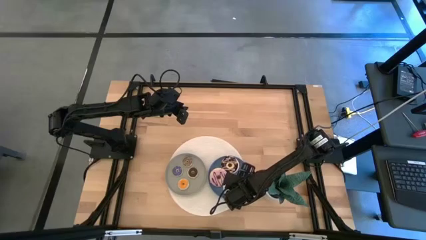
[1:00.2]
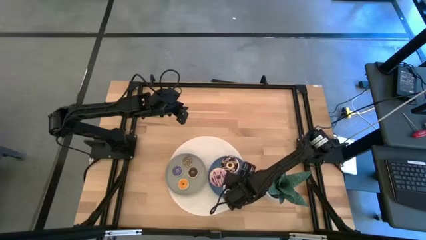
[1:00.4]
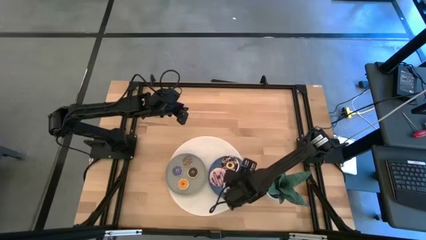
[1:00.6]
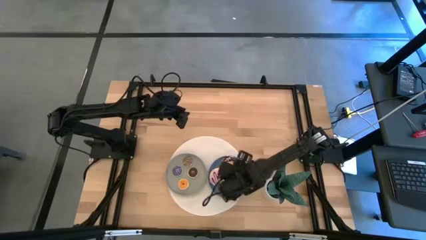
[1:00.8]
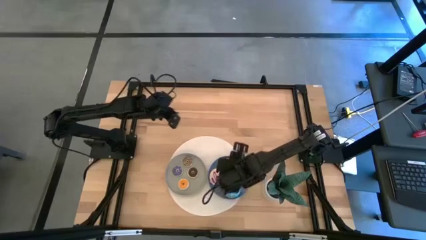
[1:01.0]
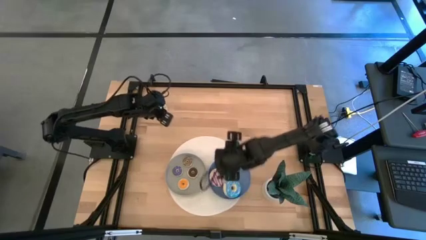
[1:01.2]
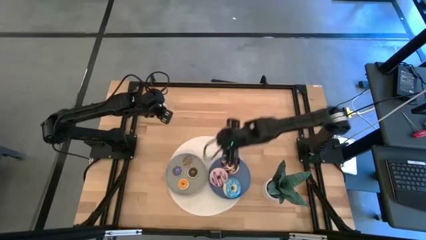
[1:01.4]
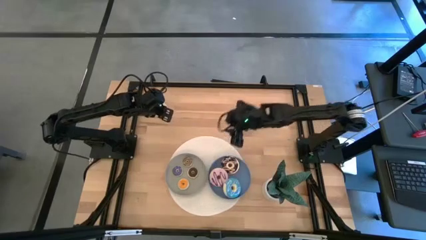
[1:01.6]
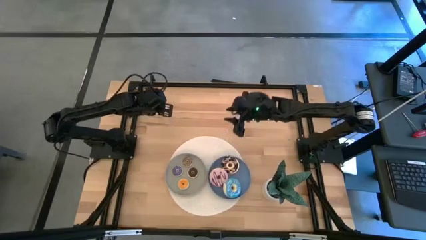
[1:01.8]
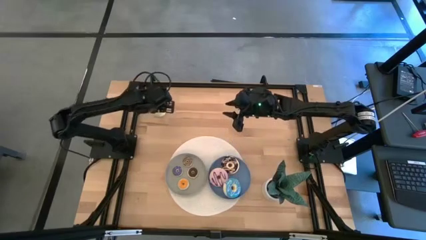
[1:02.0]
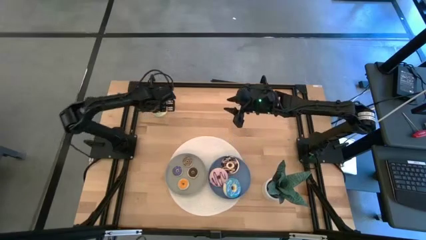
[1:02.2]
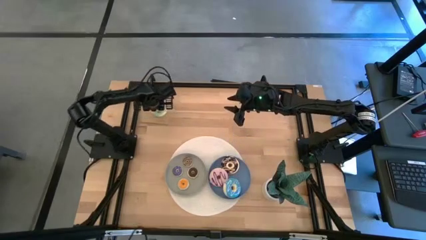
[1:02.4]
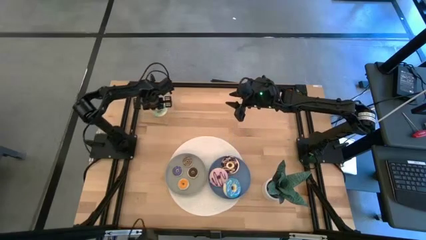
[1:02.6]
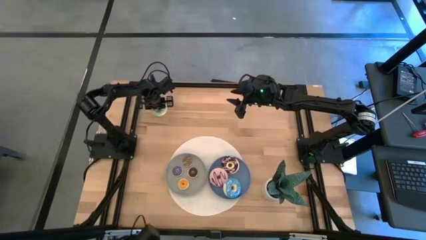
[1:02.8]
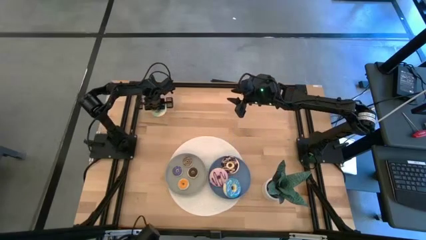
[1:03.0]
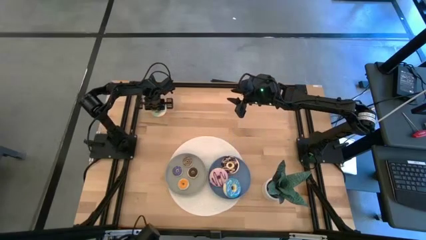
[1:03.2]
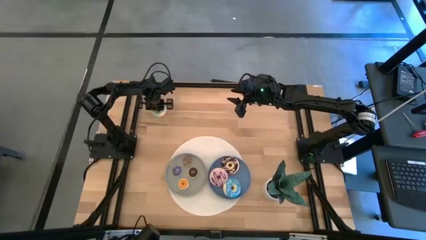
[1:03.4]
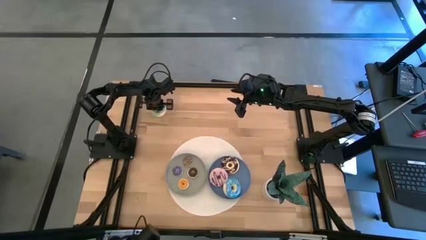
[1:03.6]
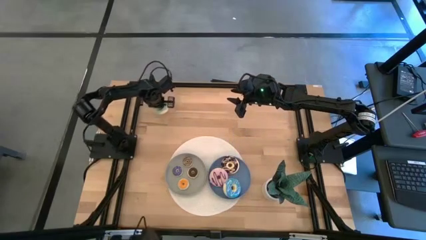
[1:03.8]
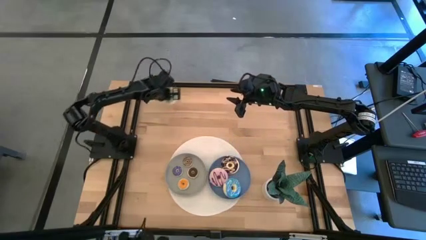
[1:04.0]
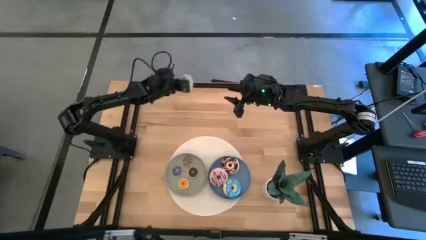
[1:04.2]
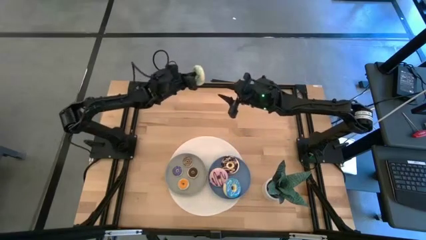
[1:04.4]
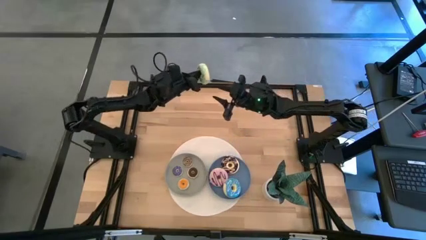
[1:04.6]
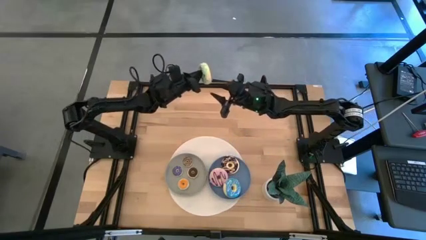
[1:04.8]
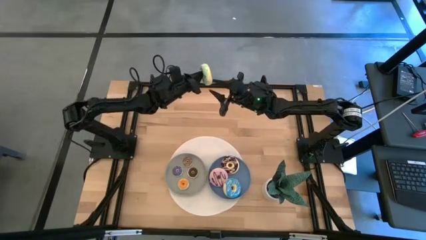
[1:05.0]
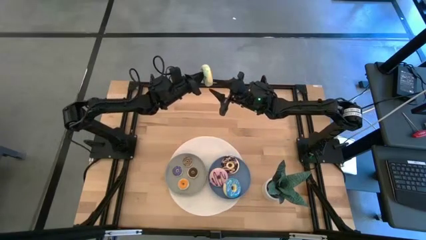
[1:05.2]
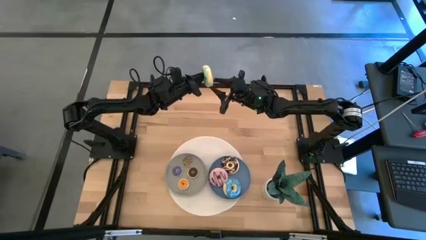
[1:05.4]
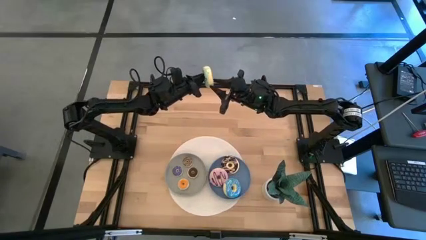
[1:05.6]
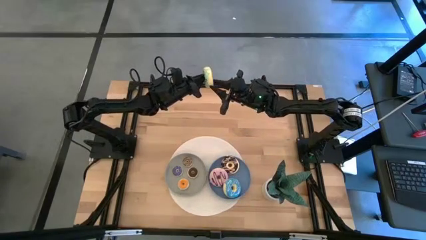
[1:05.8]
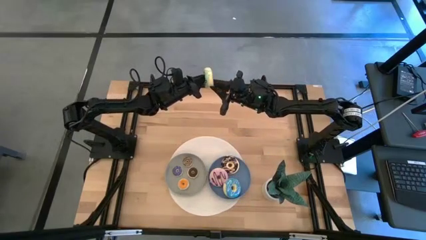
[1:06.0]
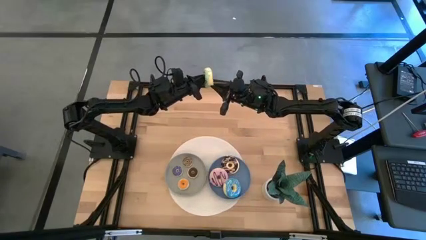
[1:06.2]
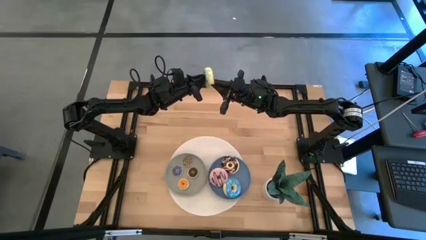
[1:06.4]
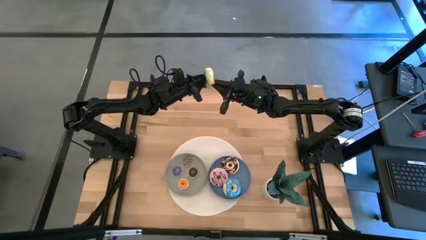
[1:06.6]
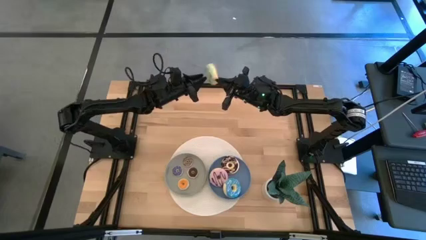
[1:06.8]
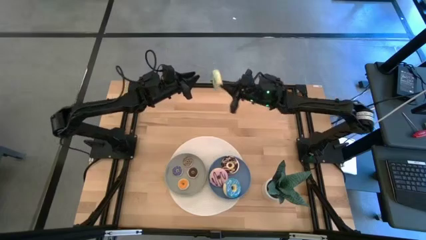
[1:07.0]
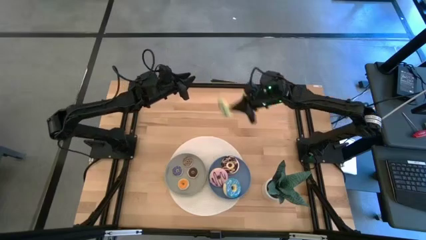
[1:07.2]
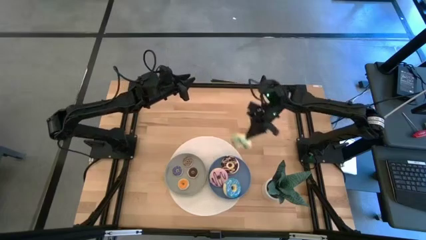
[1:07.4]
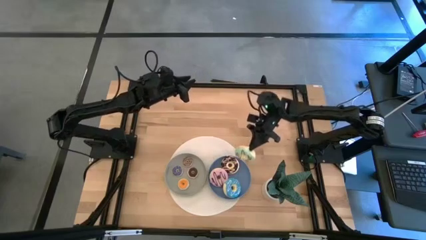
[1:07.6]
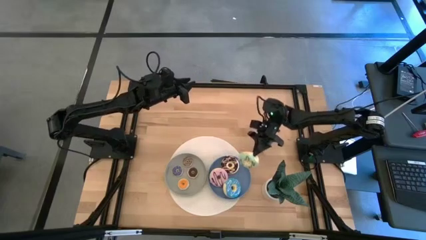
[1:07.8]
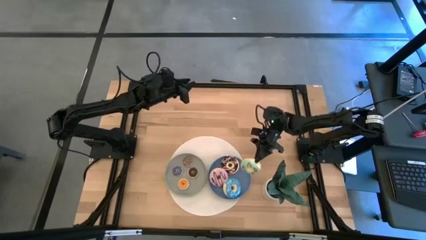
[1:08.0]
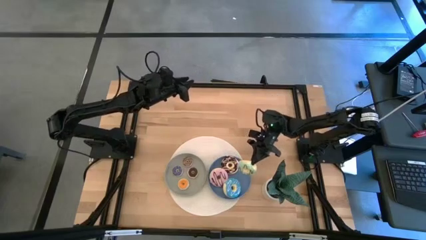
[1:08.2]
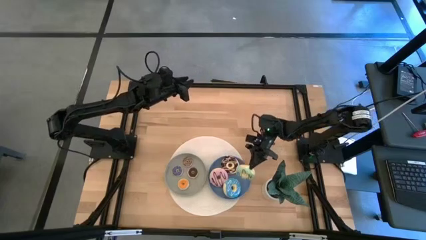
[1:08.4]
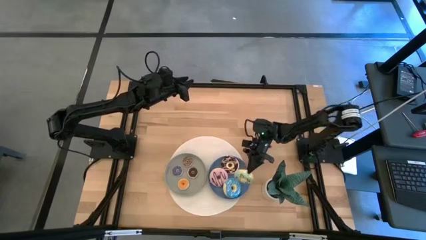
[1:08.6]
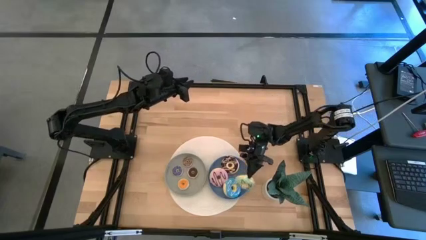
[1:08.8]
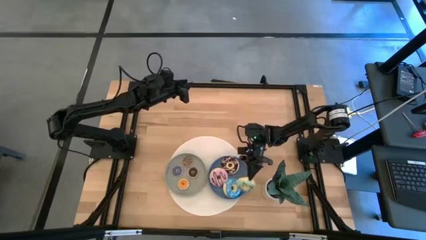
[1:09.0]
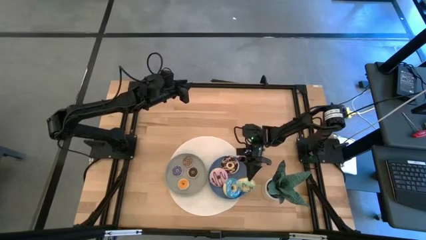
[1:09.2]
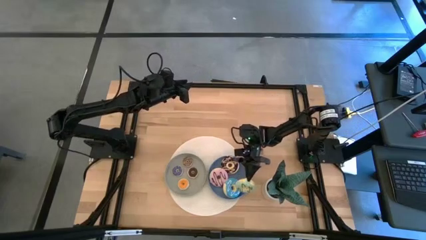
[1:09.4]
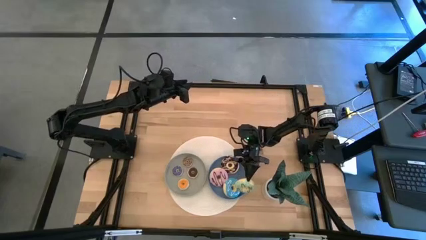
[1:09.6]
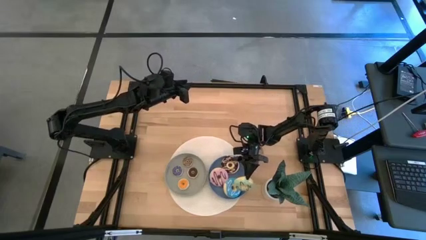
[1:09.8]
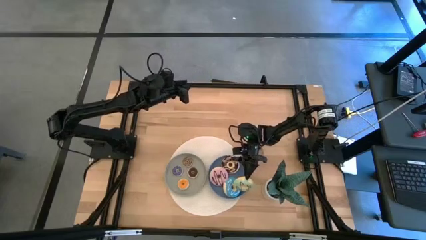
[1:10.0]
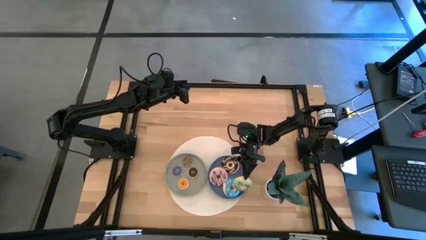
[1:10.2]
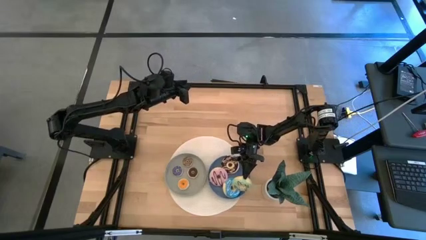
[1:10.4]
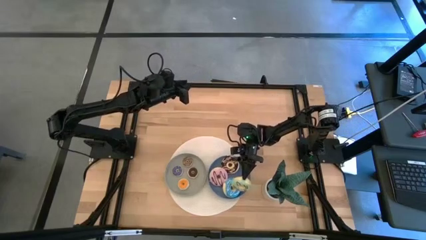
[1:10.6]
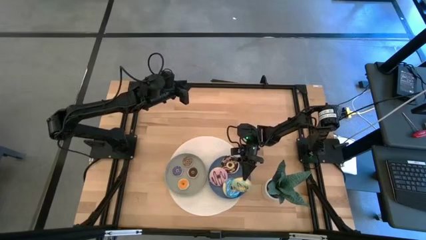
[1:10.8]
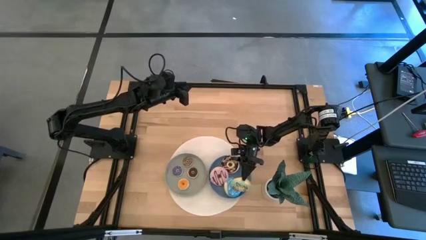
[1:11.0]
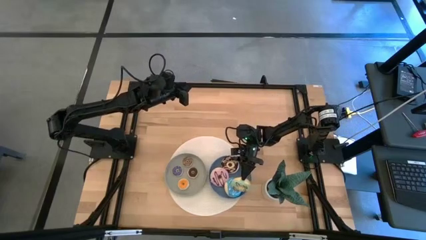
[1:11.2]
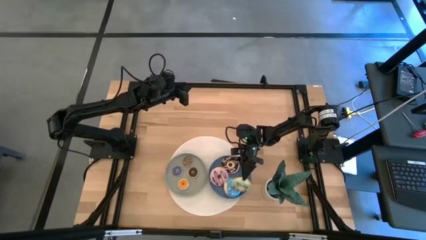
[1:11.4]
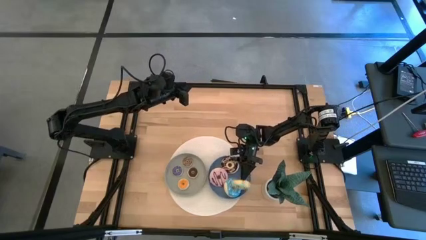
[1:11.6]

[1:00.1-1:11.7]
Task: Pick & Place donuts
Put the big green and blue donut on the blue plate

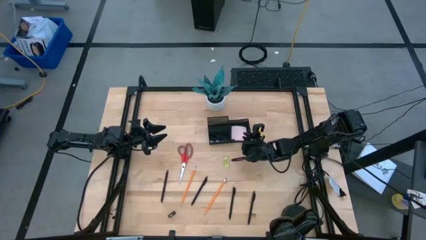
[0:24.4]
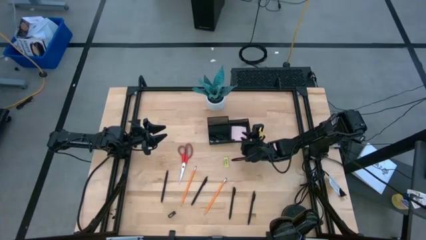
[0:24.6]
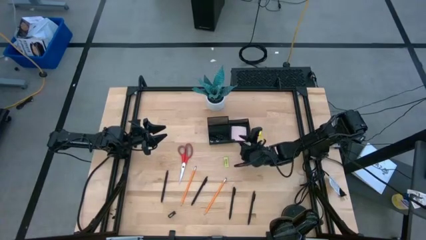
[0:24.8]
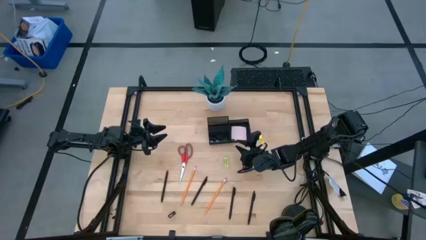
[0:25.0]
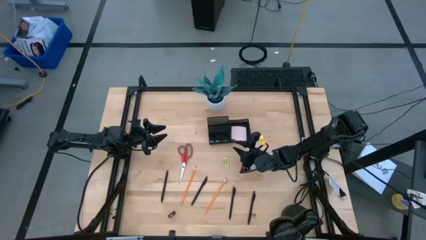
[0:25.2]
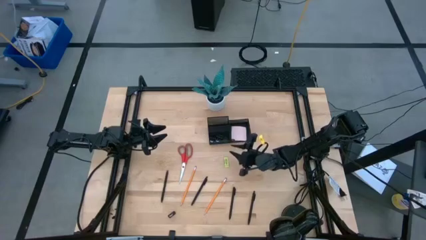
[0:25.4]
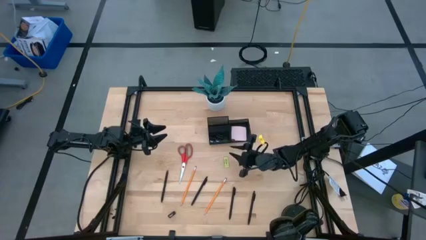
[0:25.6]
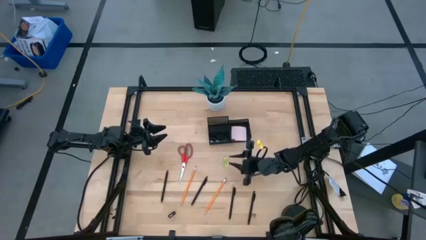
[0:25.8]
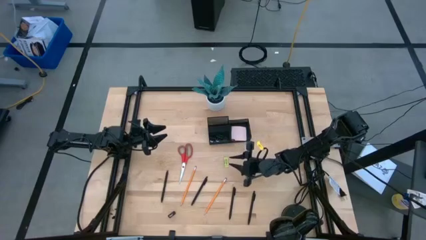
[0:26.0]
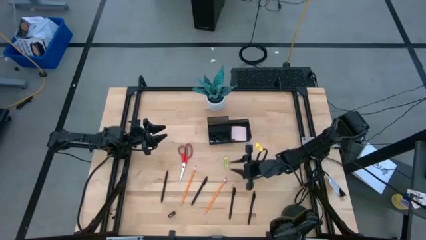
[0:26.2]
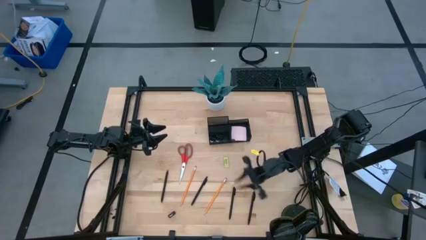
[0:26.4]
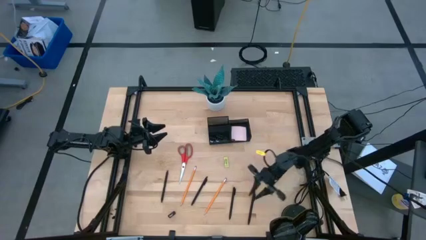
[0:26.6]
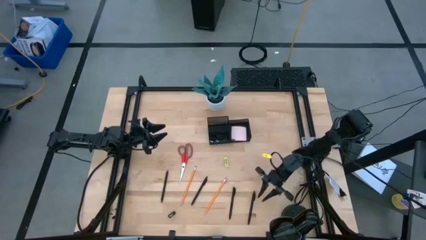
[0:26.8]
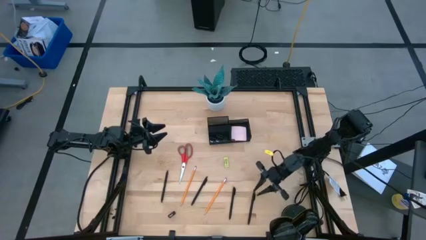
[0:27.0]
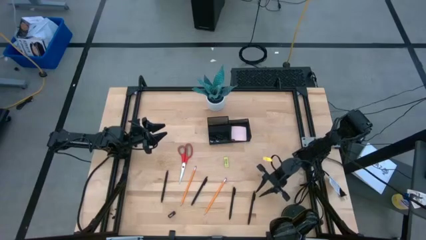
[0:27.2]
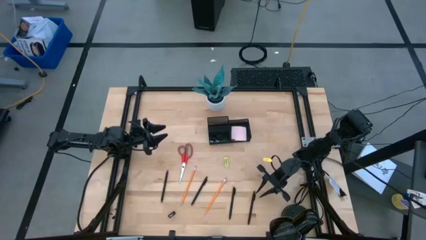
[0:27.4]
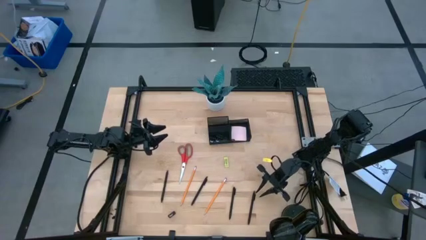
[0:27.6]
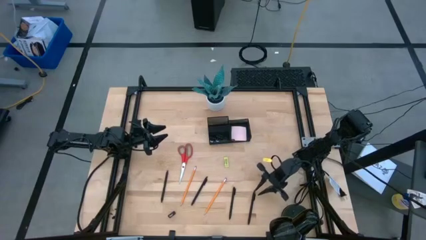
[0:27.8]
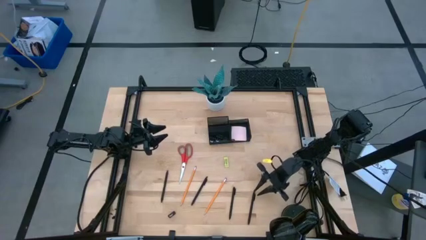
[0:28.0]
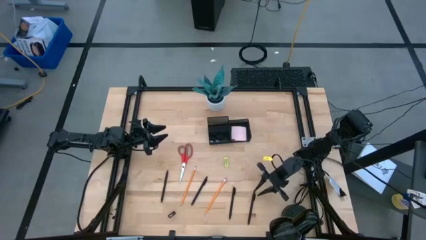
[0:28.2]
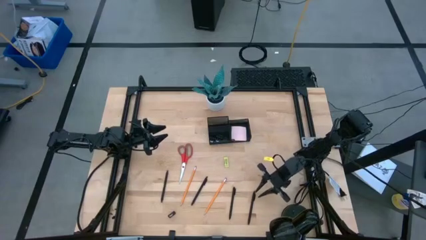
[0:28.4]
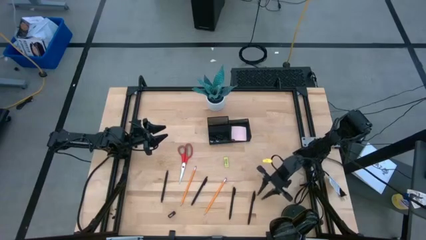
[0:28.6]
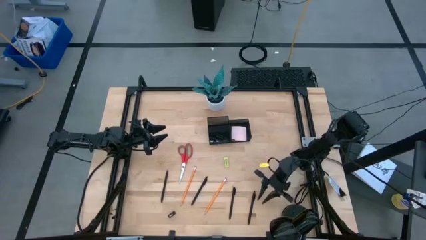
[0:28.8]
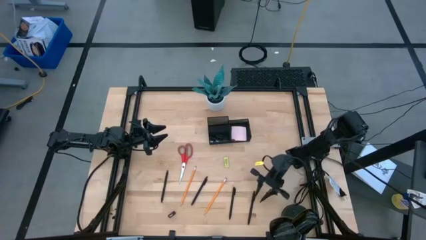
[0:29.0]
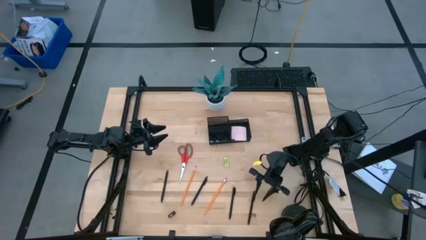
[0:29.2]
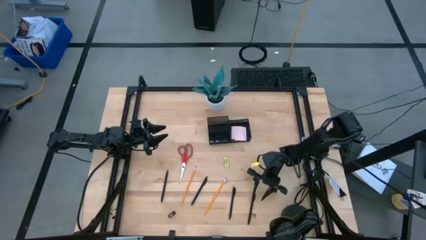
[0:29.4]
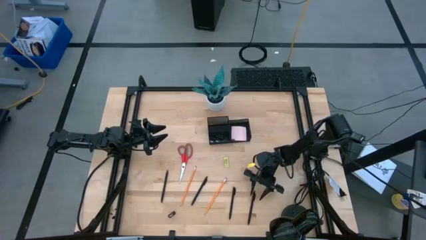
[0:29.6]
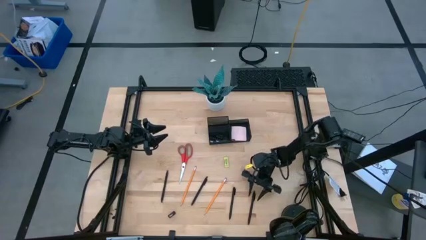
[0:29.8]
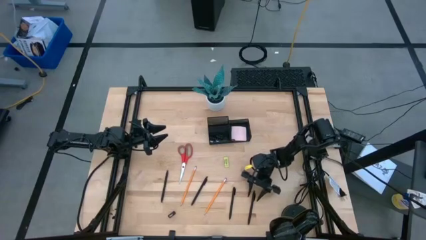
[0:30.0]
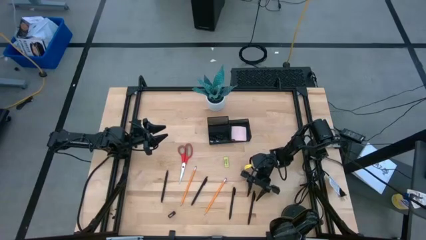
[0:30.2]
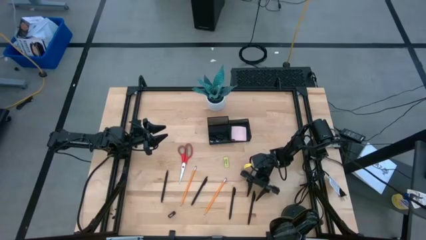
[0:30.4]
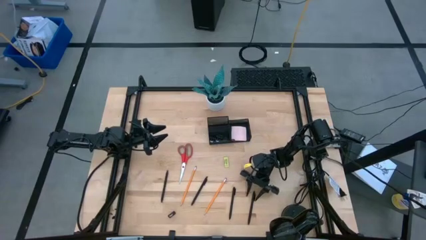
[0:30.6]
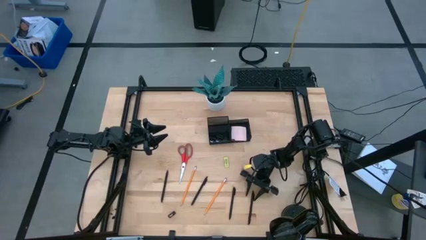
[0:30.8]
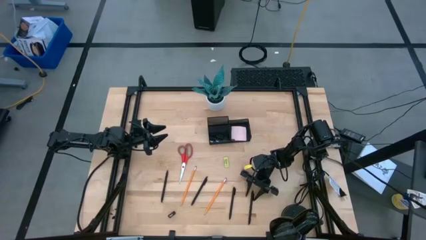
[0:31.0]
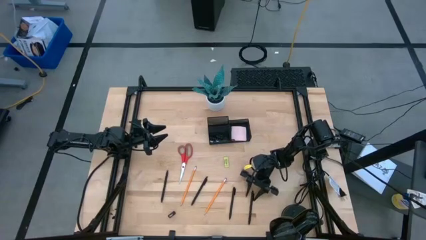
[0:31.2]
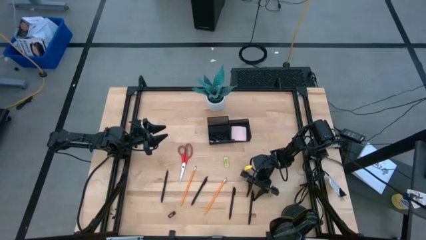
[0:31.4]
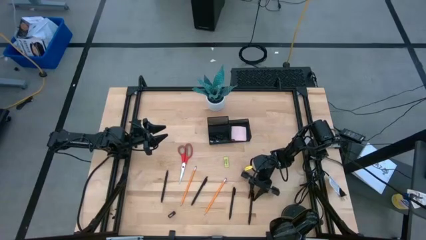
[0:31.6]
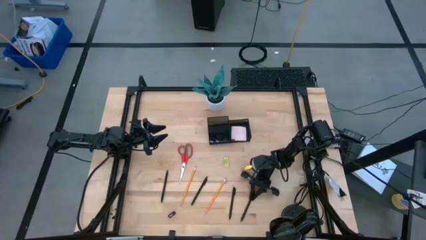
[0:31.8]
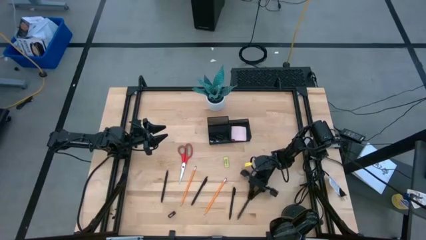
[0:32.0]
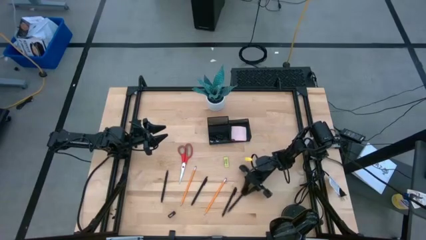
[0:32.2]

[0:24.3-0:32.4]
Task: Pick and place office supplies into organizer
Put the black pen into the black desk organizer
